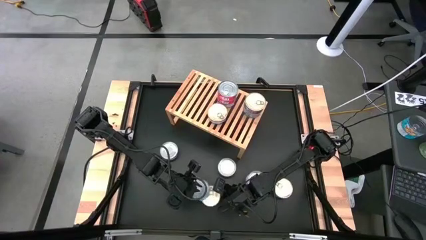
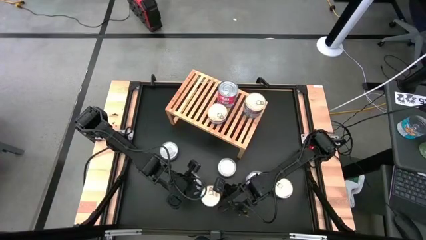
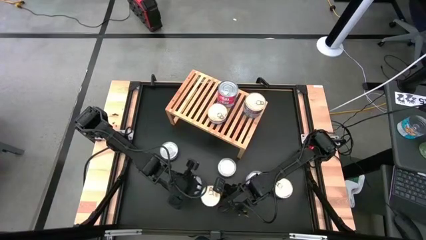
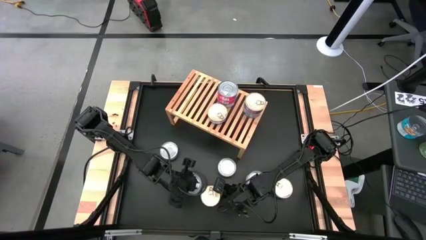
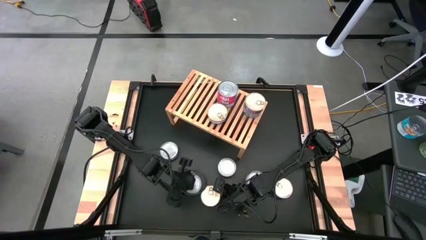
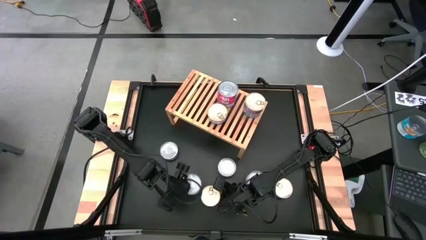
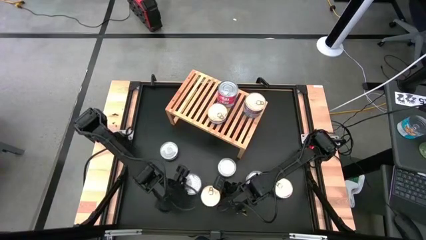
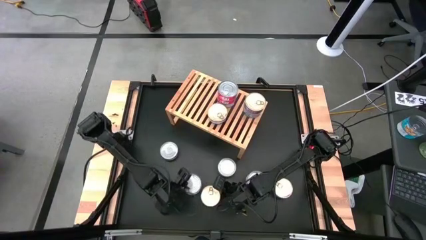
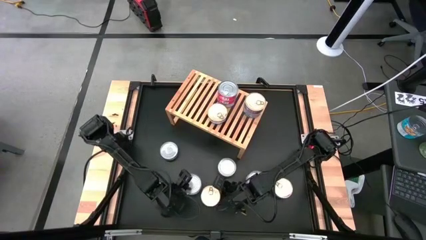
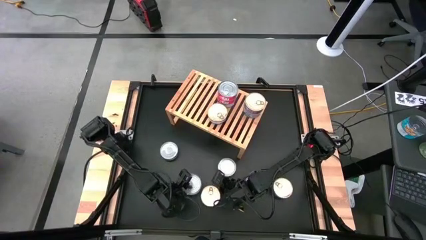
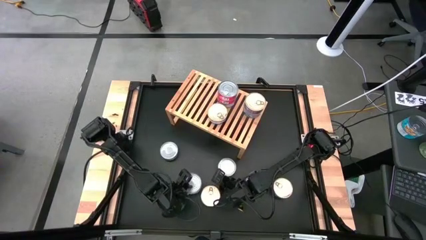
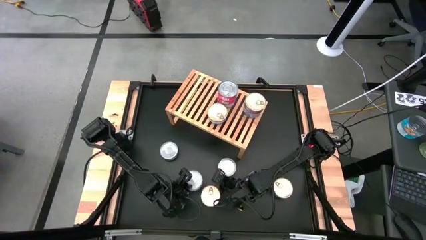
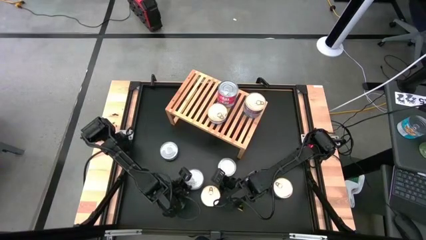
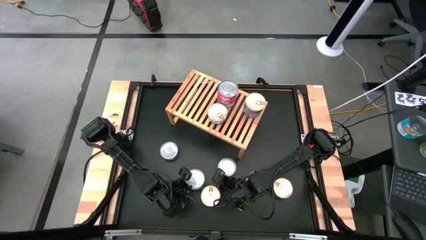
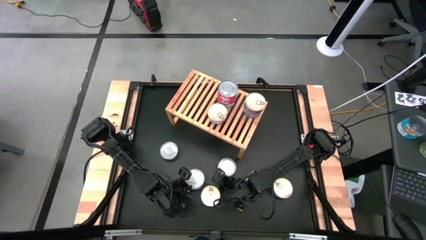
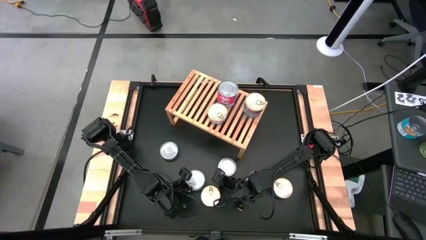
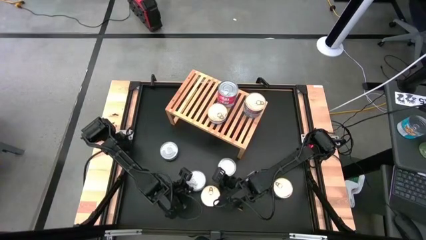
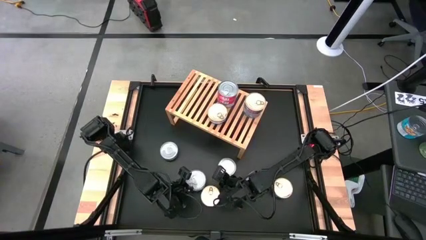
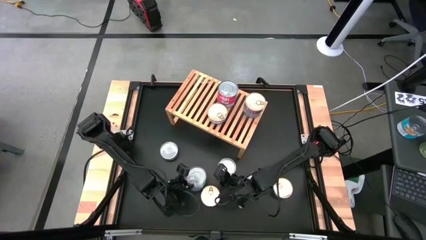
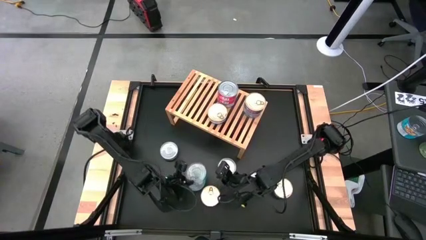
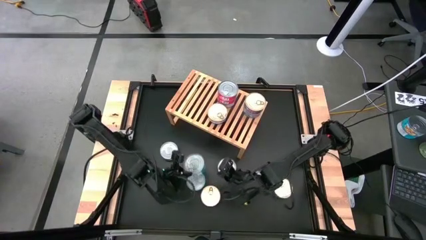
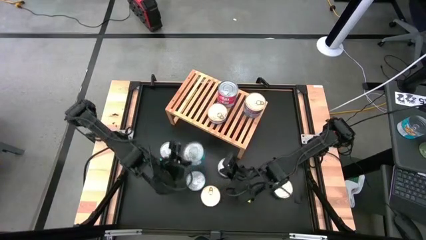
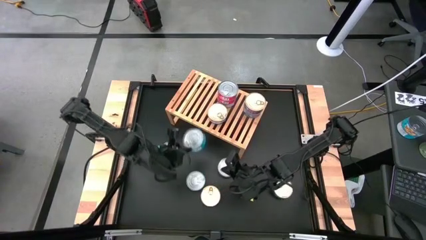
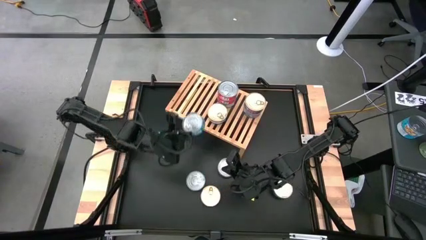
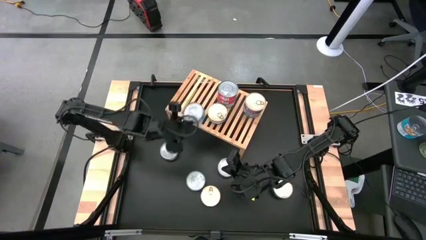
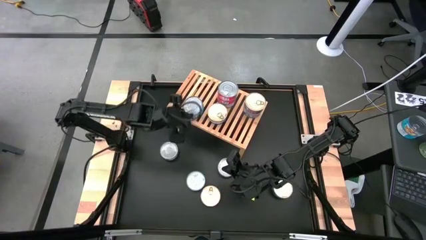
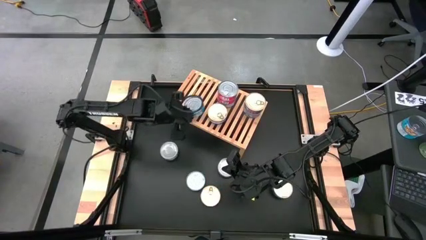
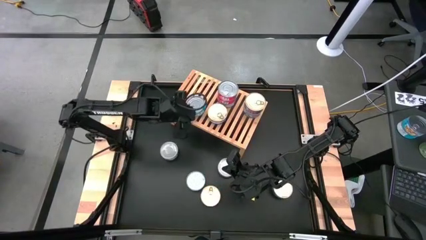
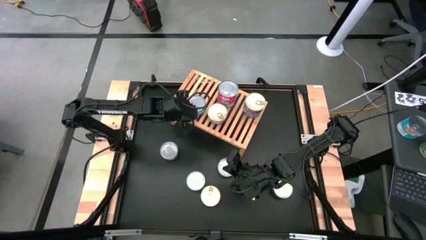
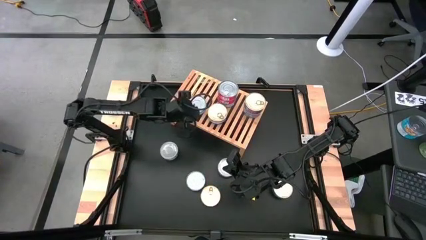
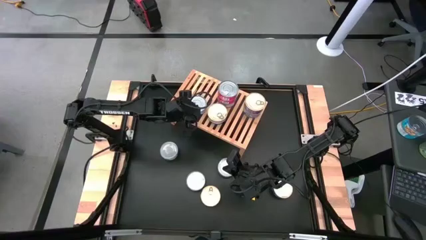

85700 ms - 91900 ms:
Task: Stack canned seafood by type on shelf
Put the yellow and blue tuna can on the shelf

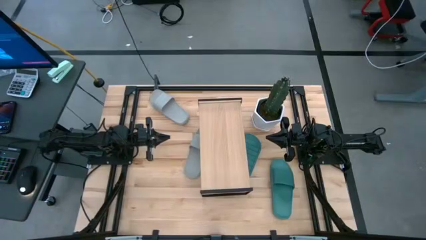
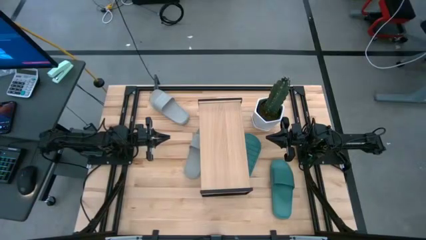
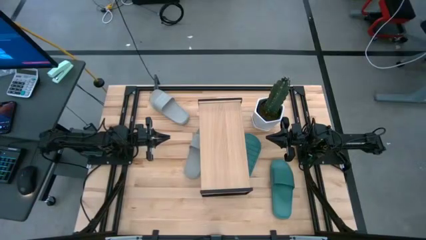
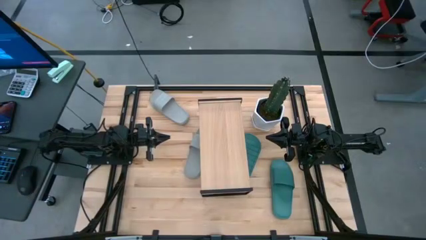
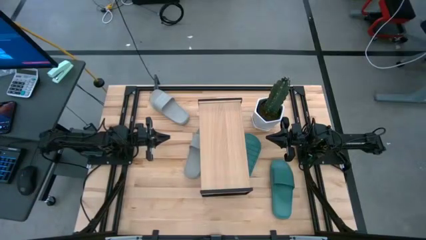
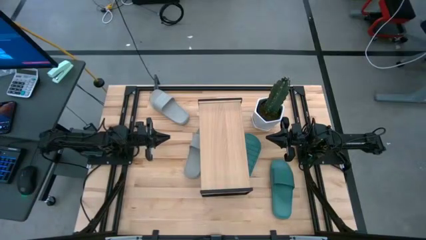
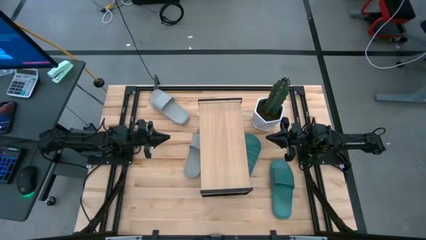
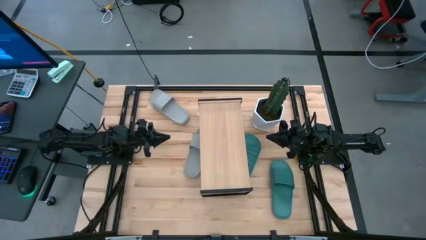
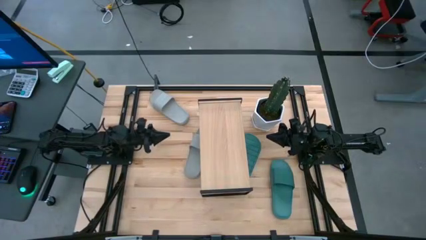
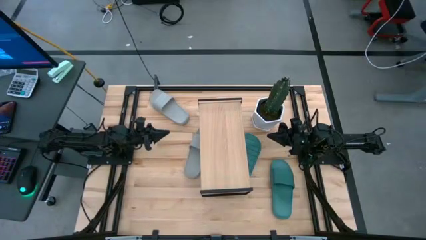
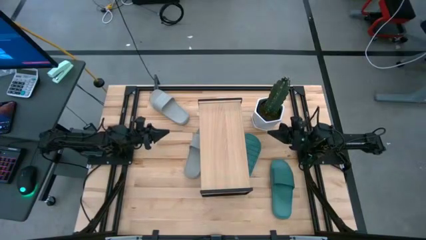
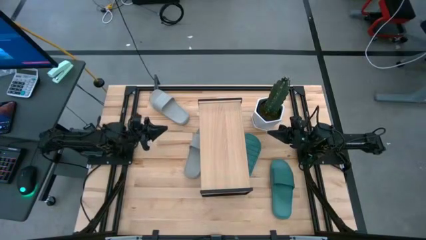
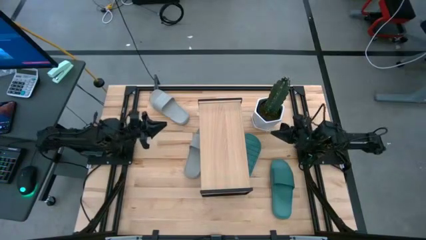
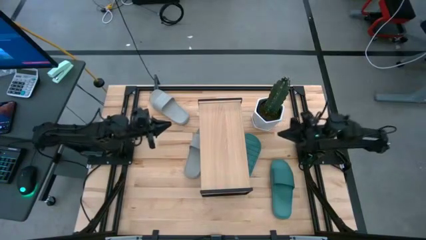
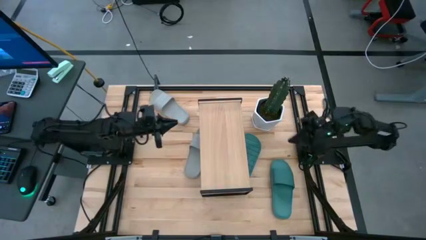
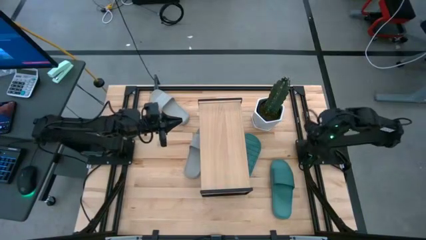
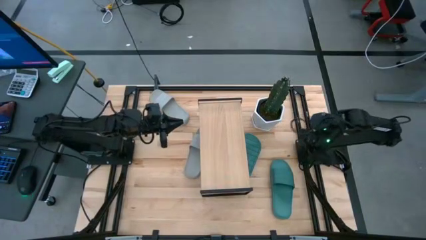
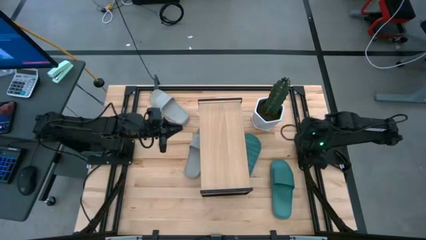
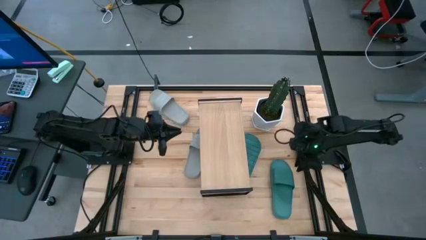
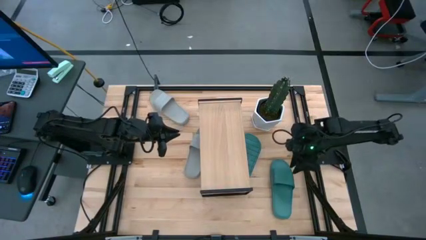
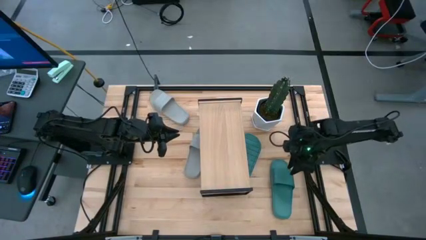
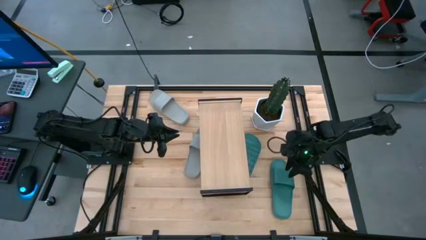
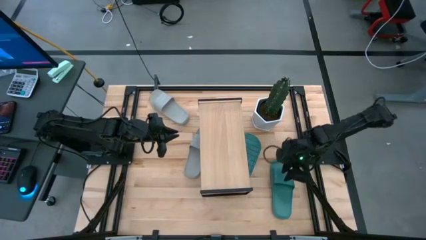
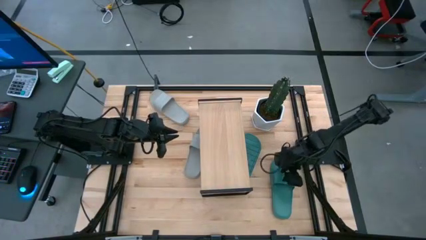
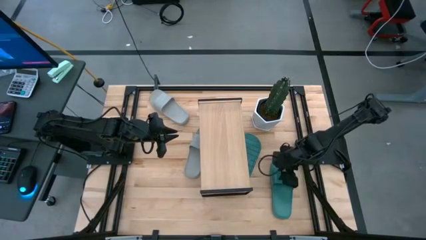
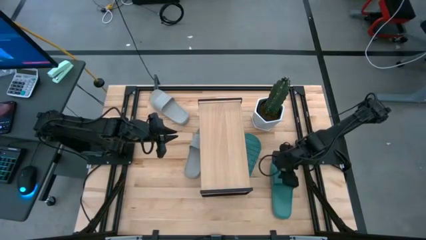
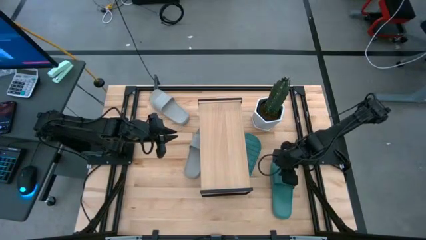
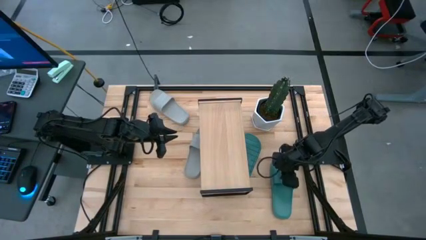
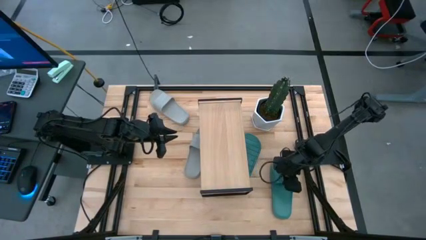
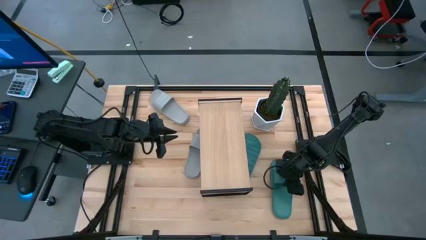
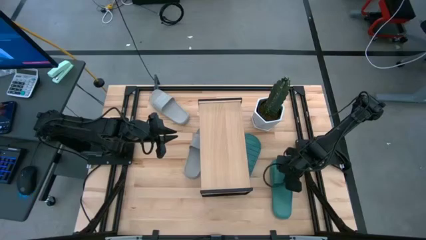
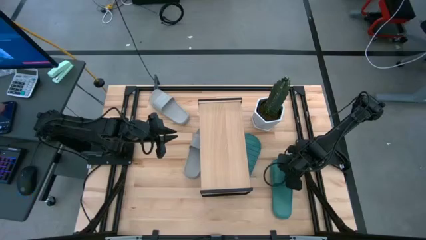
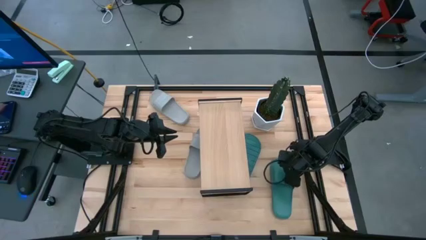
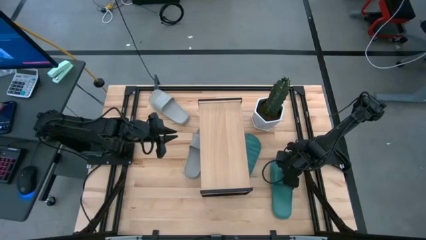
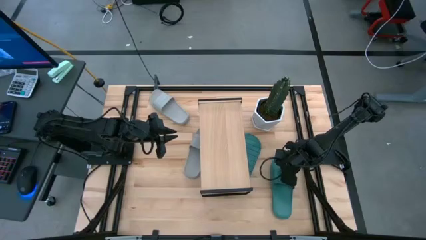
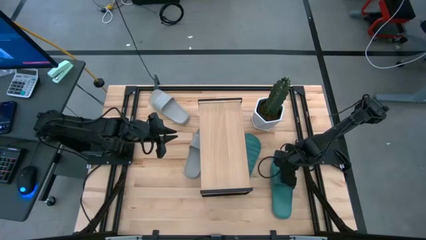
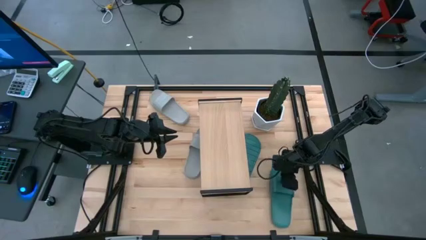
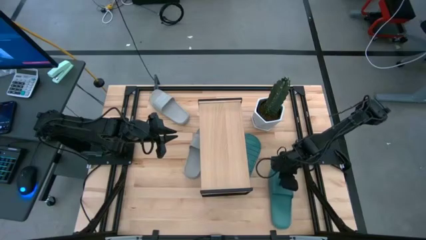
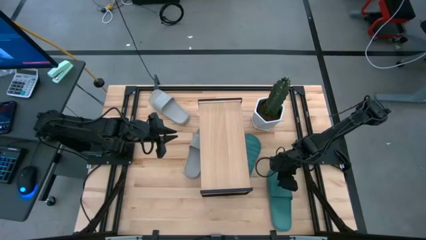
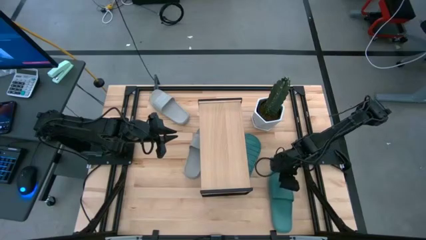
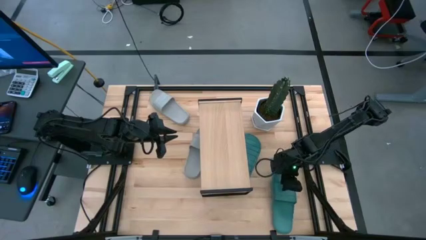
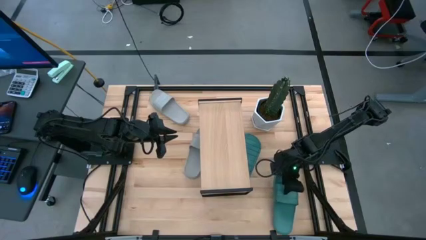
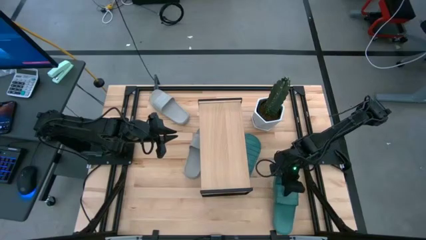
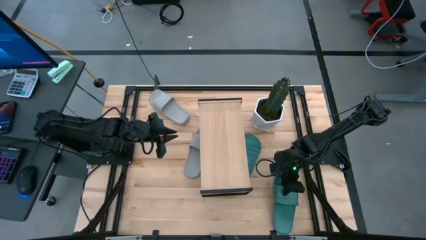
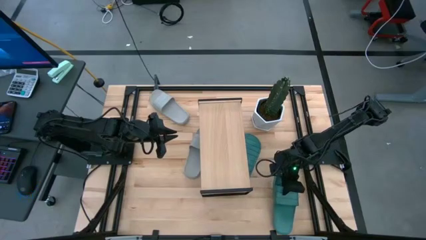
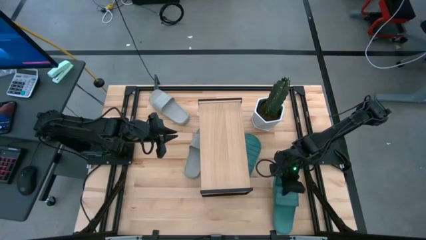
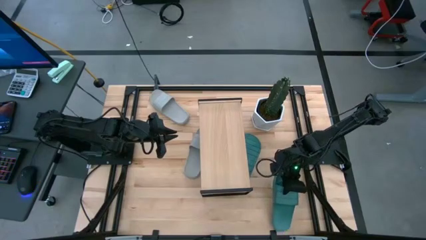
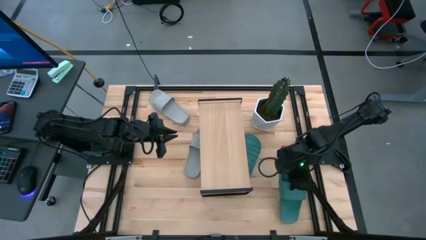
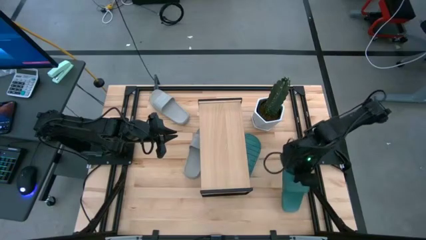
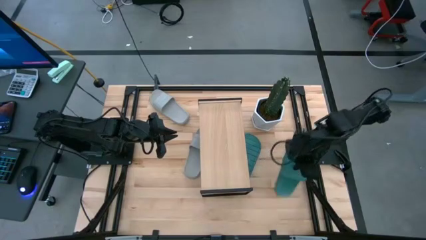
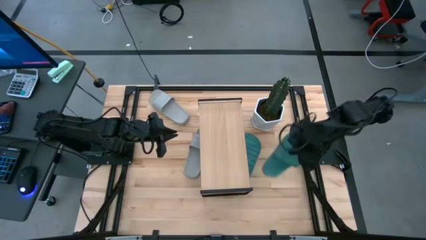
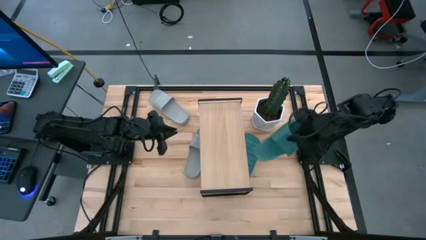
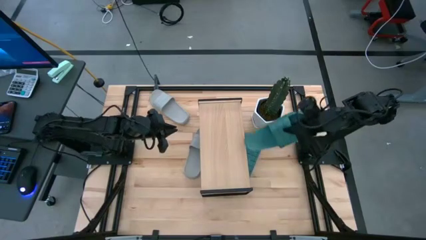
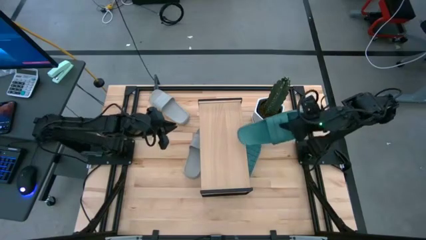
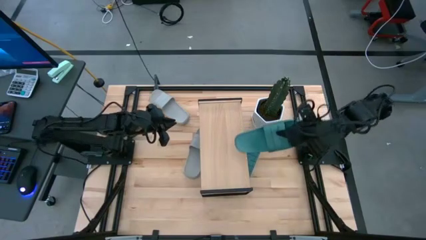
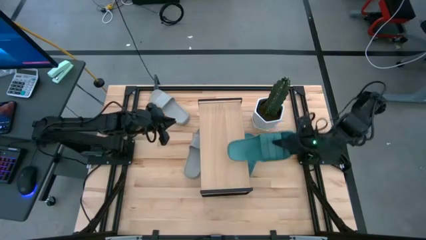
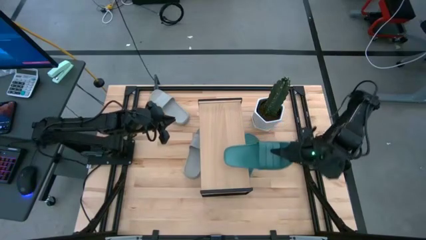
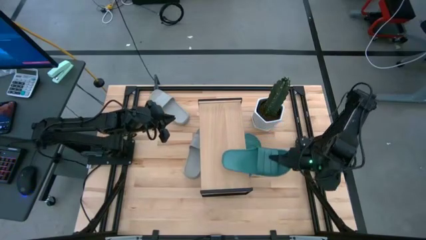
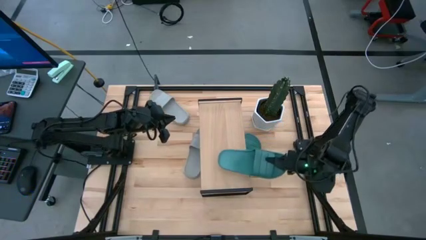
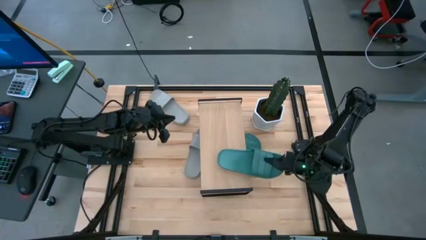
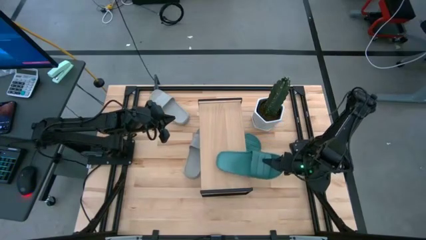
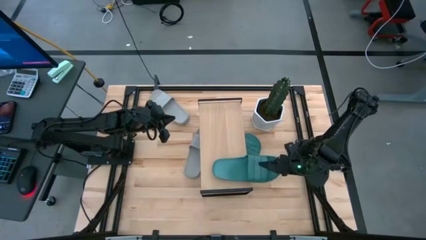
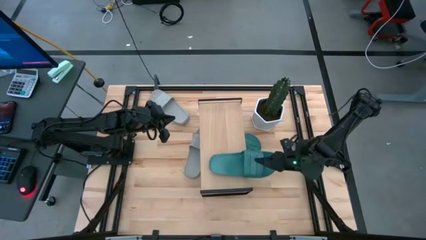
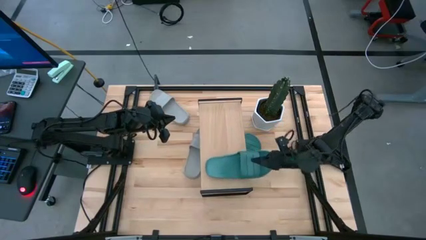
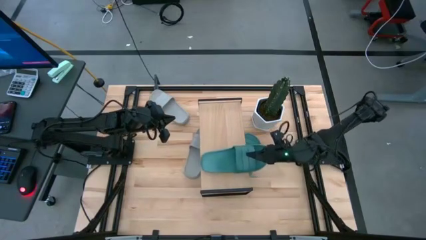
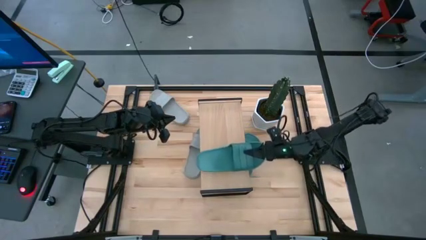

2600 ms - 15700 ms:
Task: Pick and place slides into the shelf
Put the right green slide on the shelf
